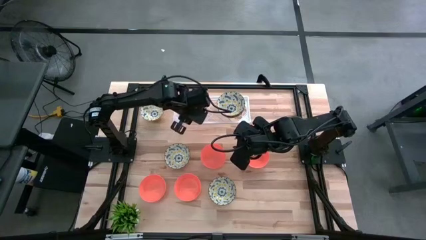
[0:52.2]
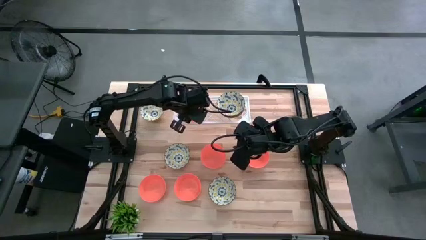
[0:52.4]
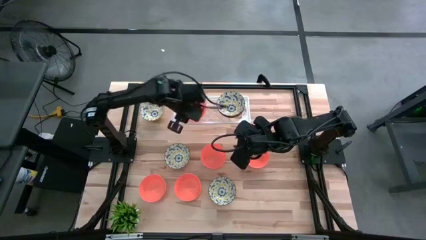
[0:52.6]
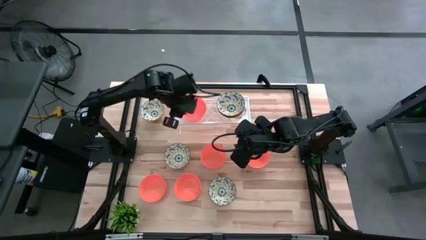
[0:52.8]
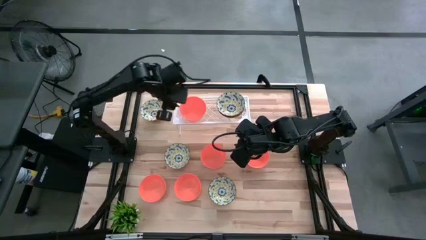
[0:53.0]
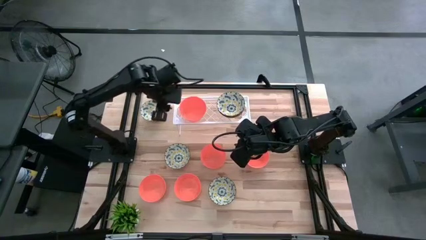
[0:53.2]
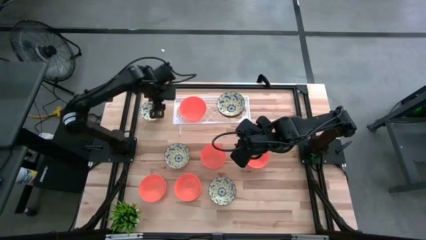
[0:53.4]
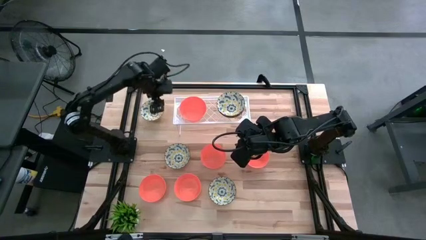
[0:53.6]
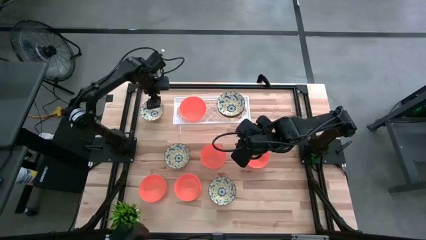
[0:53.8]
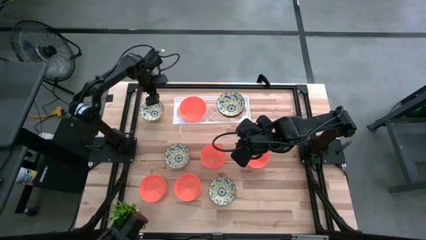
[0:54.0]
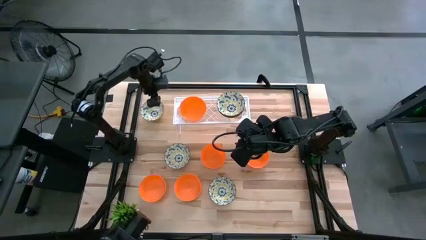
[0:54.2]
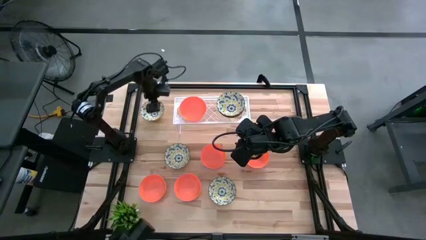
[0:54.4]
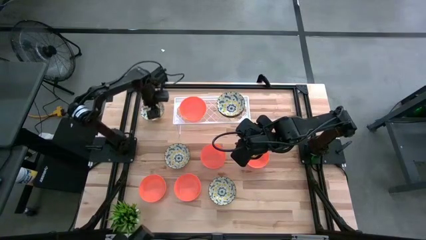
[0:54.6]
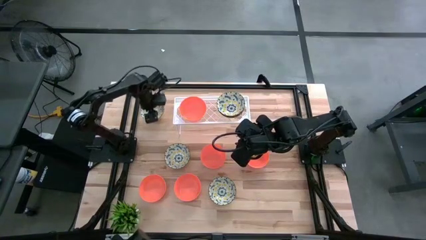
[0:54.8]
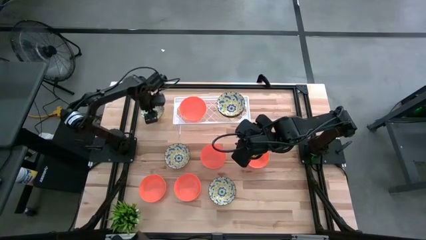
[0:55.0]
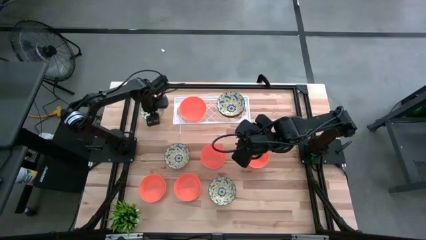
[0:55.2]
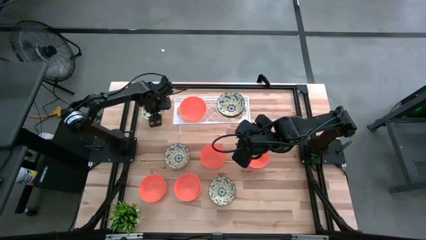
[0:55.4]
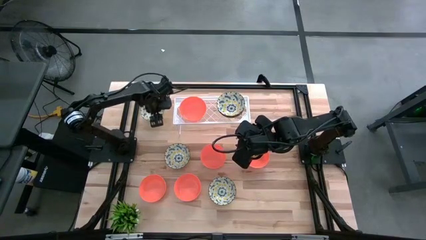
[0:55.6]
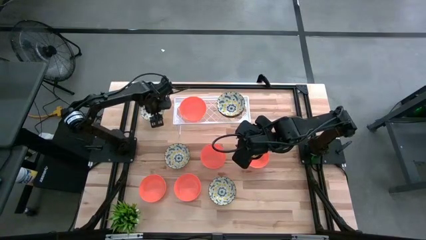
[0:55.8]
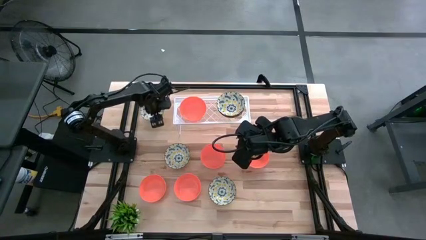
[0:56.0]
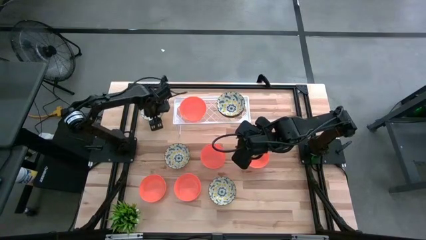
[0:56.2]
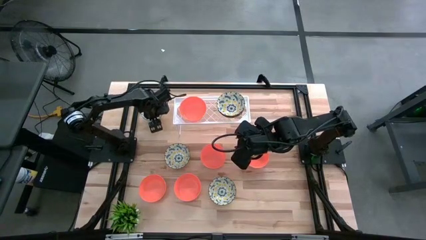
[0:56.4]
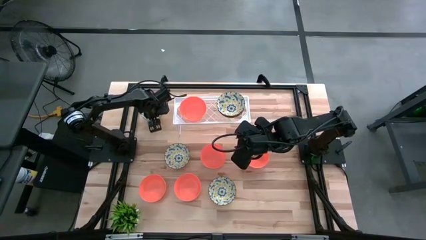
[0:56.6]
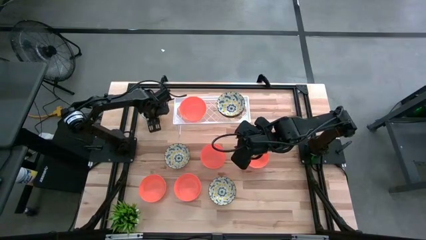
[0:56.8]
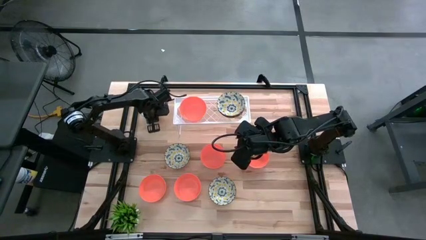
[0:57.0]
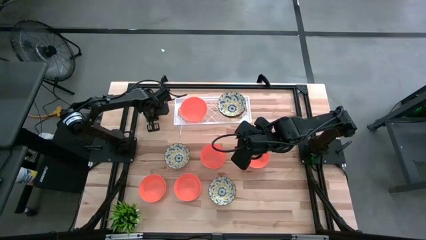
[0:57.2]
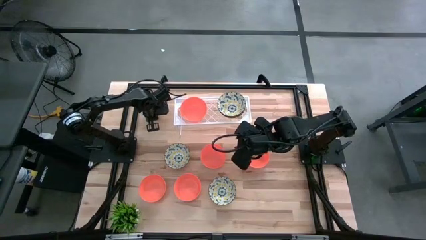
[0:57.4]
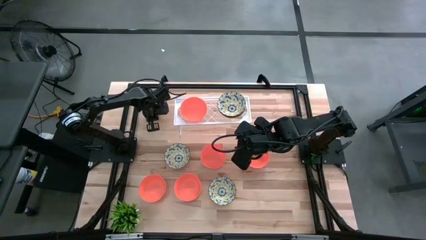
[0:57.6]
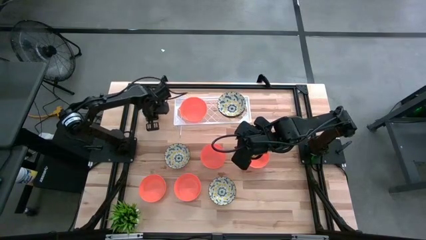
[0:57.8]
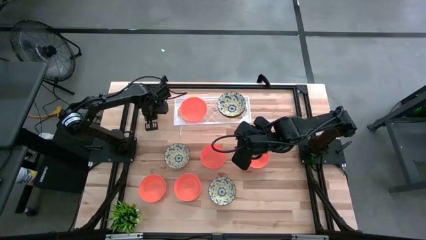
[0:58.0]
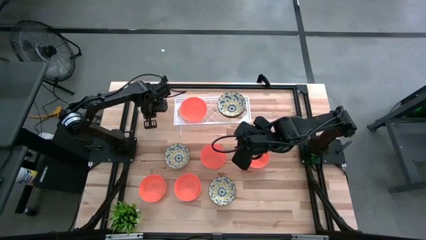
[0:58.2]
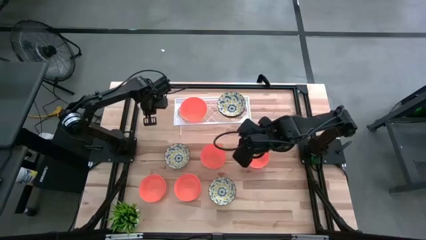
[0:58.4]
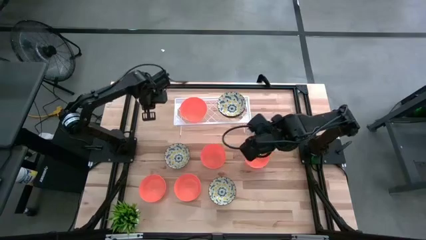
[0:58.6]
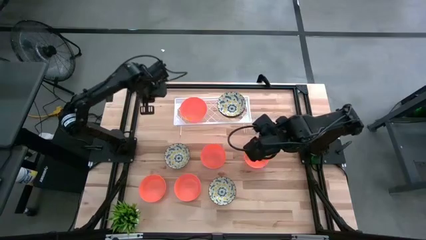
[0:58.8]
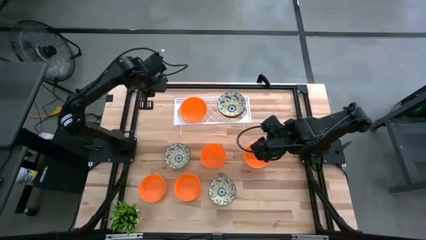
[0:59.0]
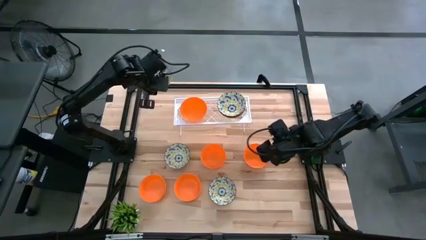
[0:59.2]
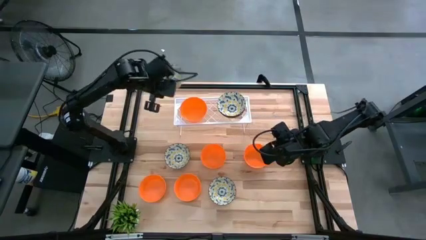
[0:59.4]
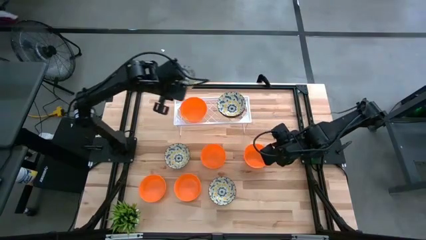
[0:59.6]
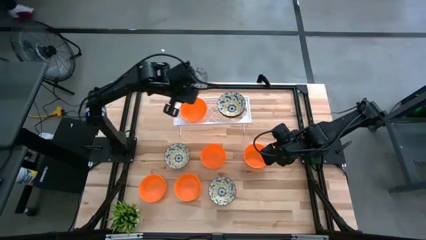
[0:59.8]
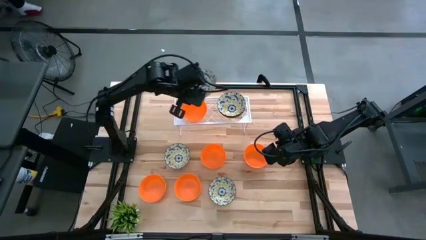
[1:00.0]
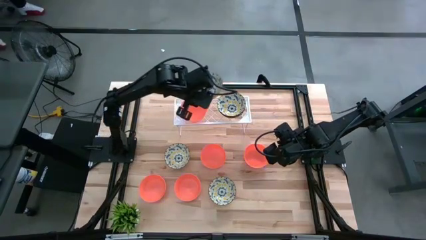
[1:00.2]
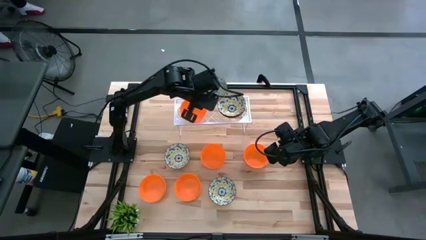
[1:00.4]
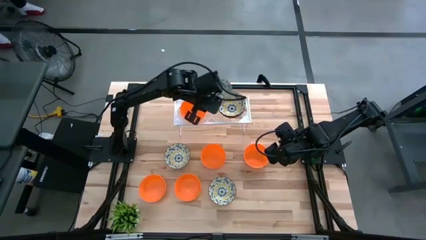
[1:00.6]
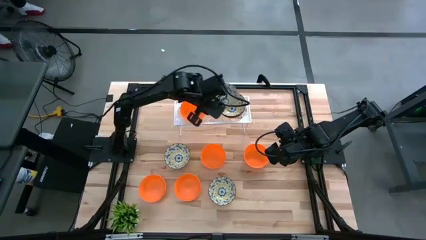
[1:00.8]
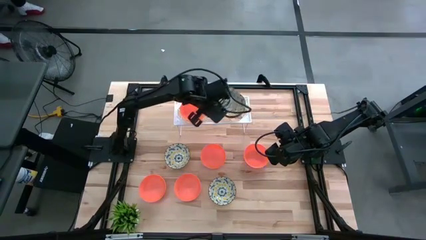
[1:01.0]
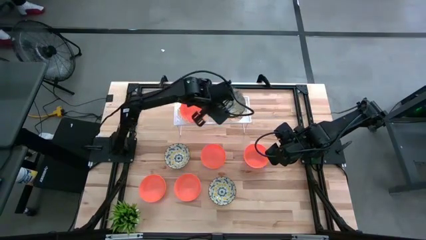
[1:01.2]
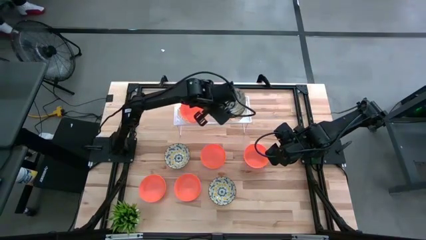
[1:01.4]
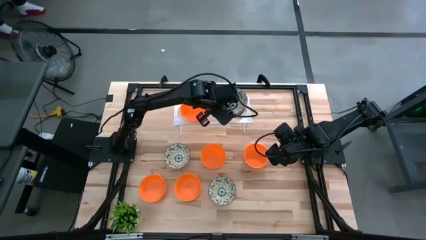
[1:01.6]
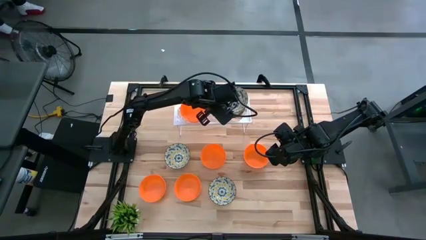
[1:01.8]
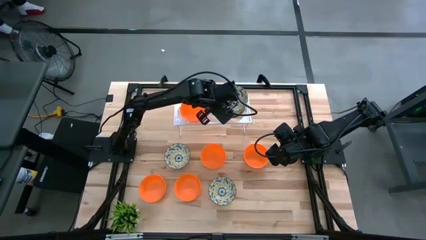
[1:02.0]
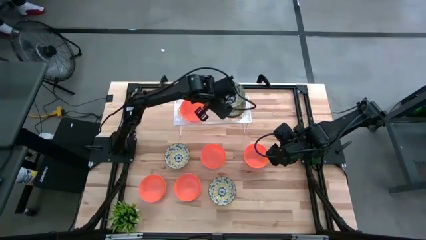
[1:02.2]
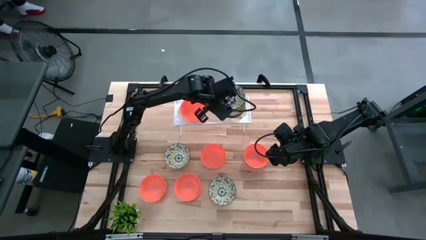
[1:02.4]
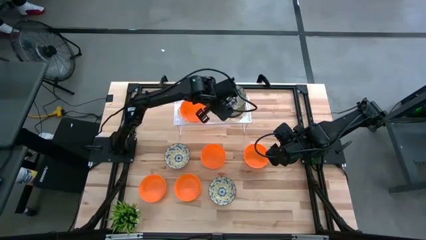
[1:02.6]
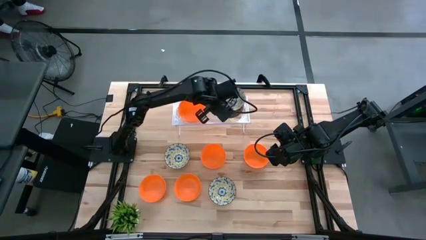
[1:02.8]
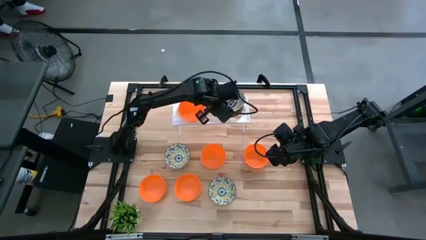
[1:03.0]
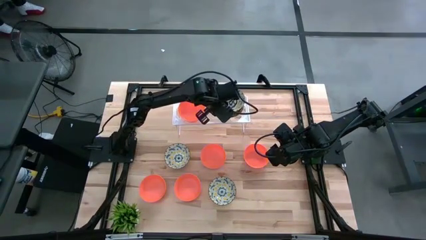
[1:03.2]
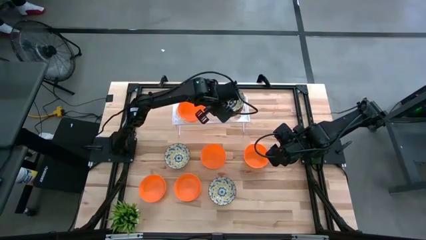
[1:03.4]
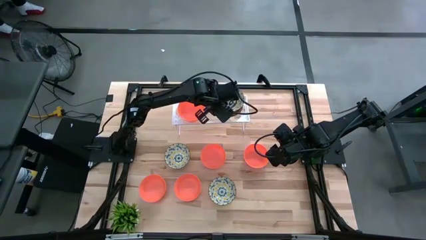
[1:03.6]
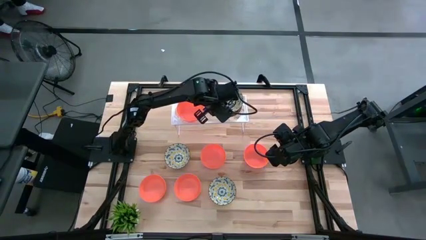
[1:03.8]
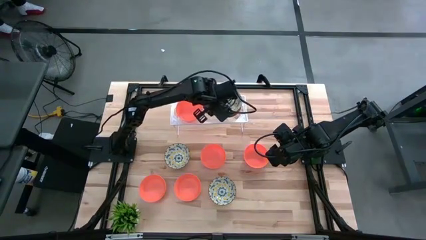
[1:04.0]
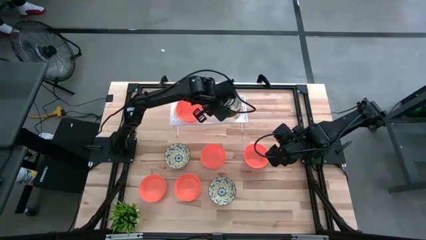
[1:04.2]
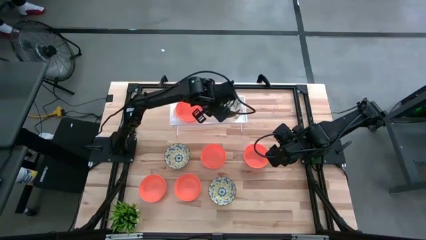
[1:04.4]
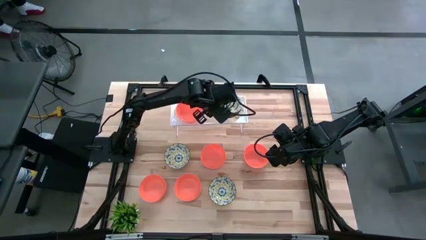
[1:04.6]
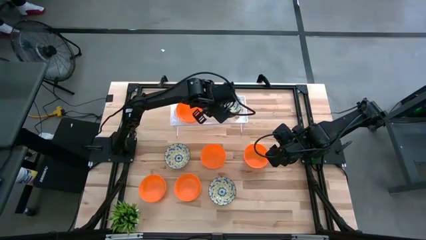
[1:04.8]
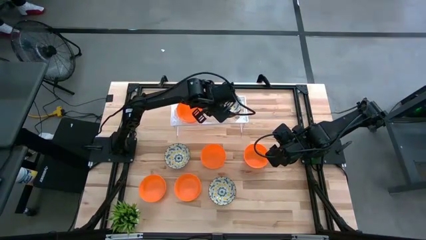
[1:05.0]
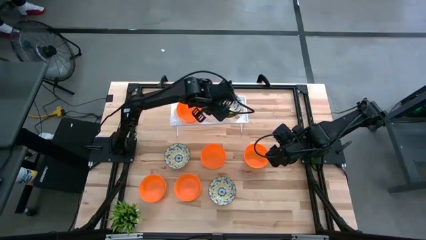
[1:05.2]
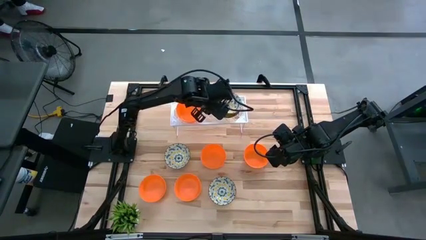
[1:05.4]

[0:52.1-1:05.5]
Task: Pick & Place Mini bowls
Stack the white patterned bowl on the other white patterned bowls on the shelf
